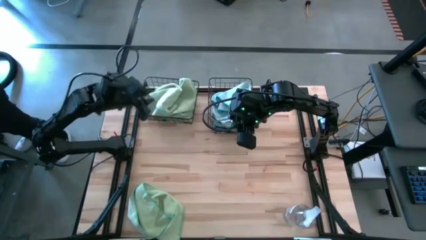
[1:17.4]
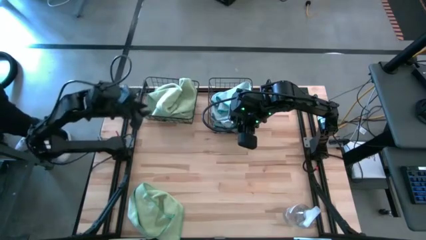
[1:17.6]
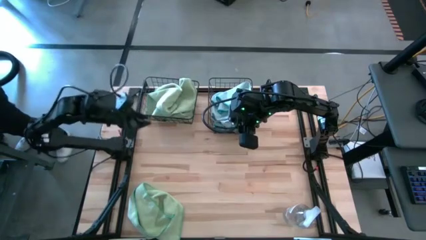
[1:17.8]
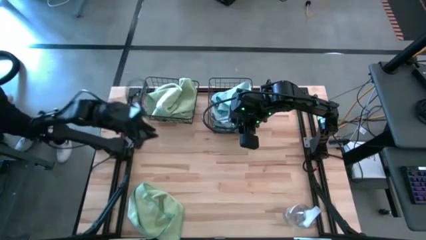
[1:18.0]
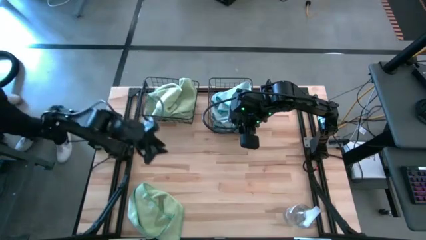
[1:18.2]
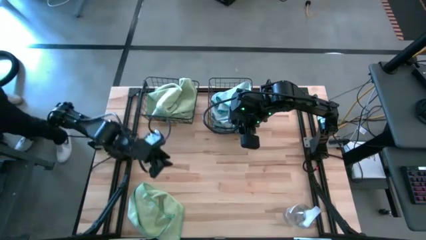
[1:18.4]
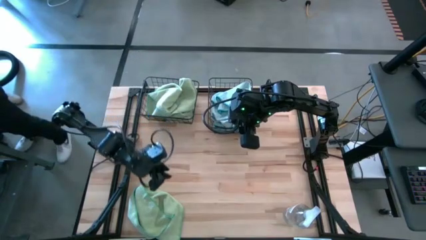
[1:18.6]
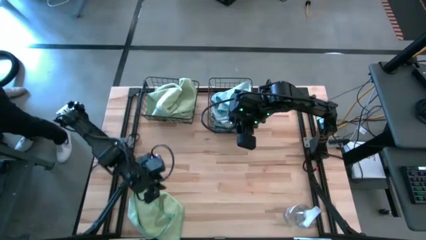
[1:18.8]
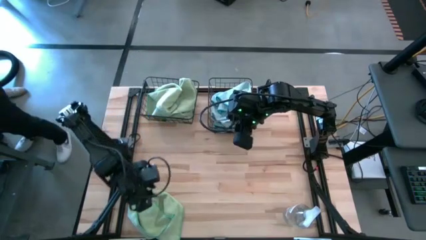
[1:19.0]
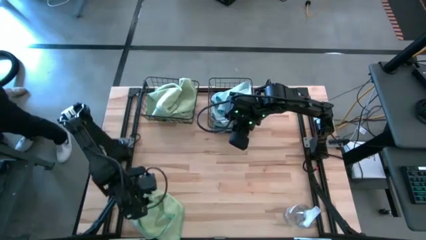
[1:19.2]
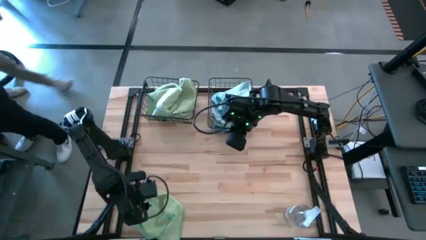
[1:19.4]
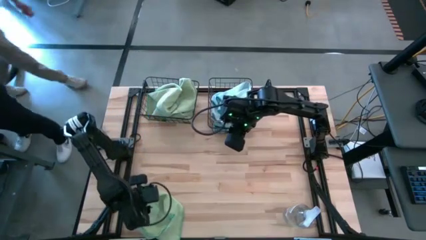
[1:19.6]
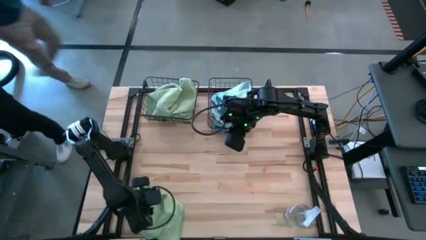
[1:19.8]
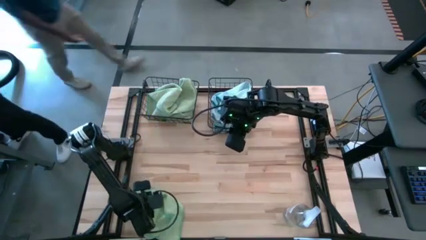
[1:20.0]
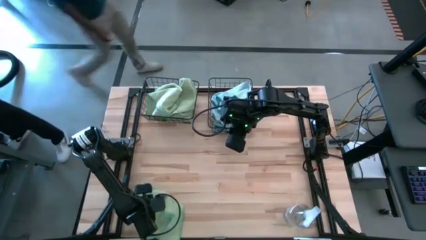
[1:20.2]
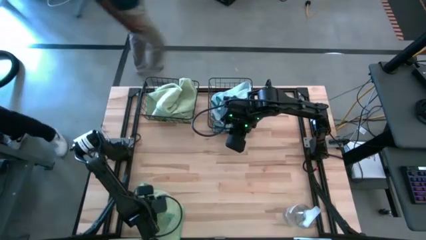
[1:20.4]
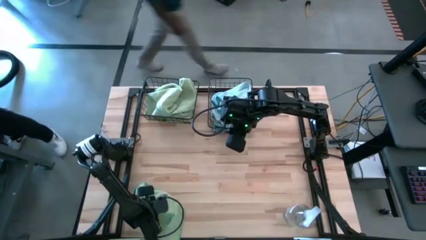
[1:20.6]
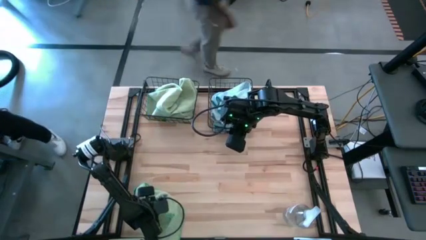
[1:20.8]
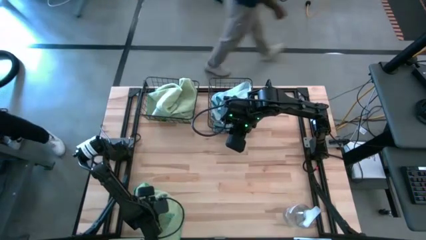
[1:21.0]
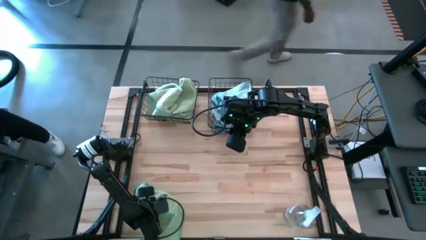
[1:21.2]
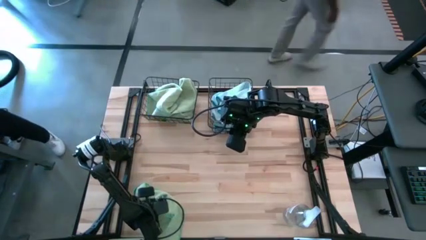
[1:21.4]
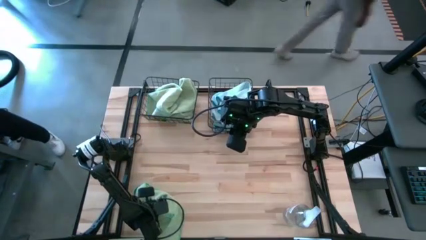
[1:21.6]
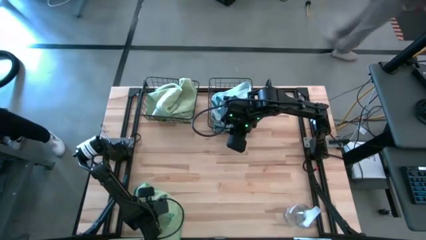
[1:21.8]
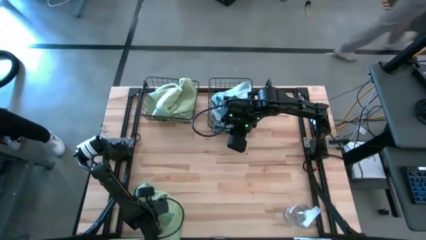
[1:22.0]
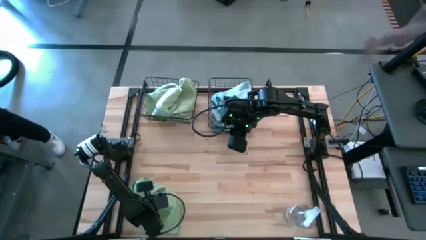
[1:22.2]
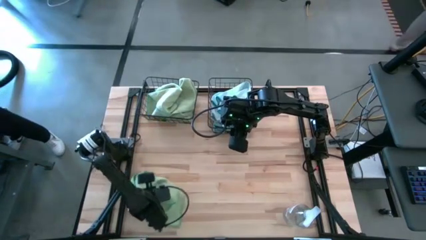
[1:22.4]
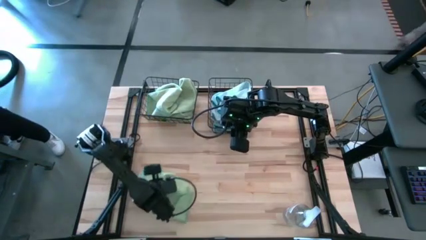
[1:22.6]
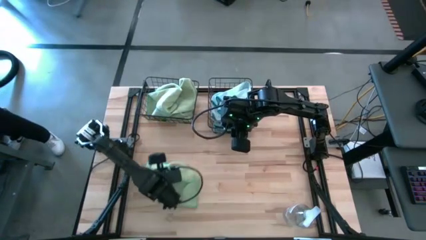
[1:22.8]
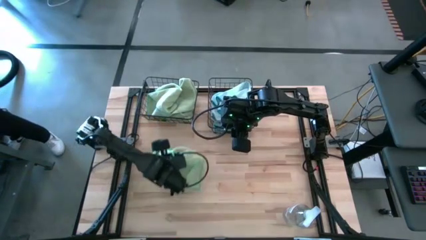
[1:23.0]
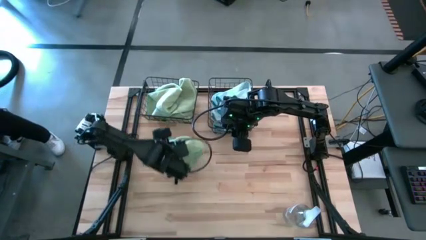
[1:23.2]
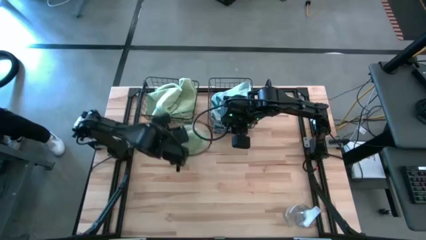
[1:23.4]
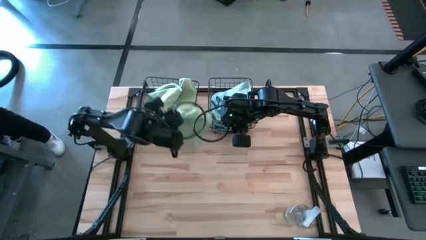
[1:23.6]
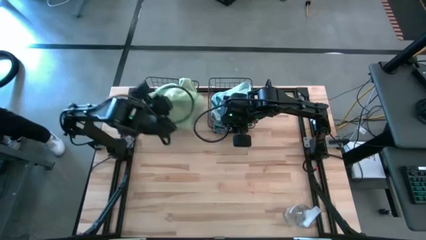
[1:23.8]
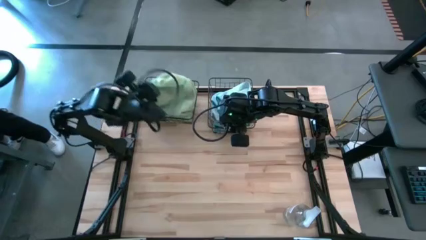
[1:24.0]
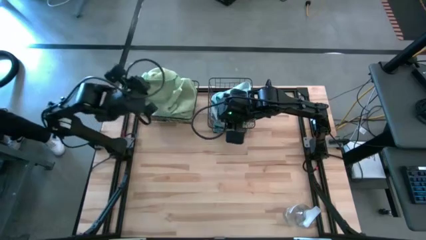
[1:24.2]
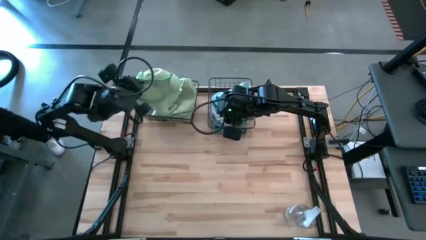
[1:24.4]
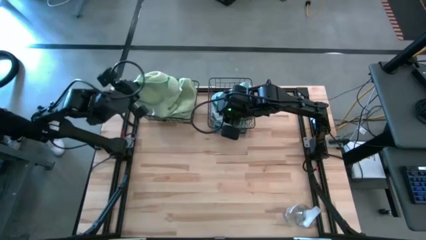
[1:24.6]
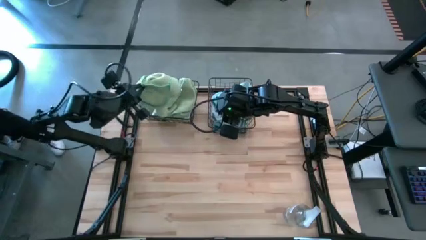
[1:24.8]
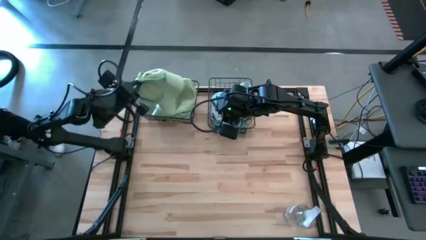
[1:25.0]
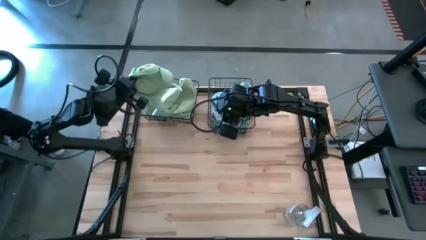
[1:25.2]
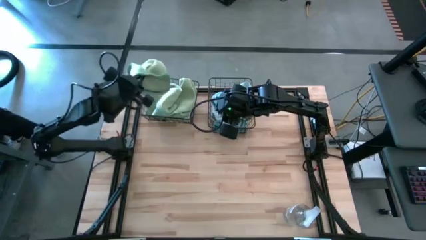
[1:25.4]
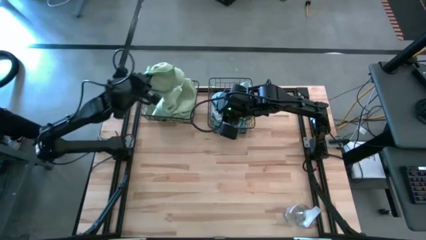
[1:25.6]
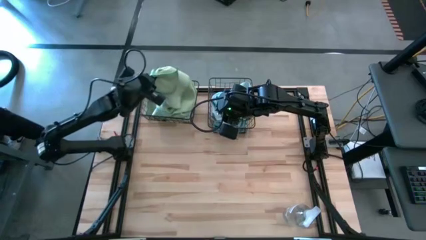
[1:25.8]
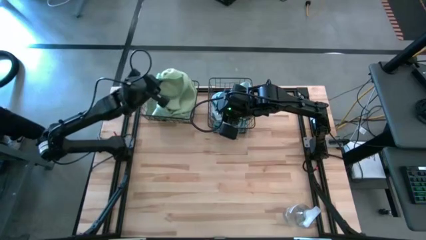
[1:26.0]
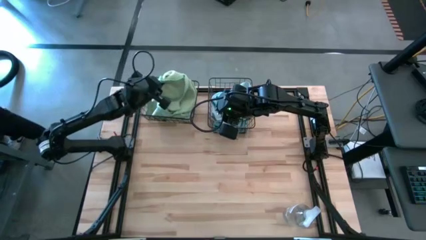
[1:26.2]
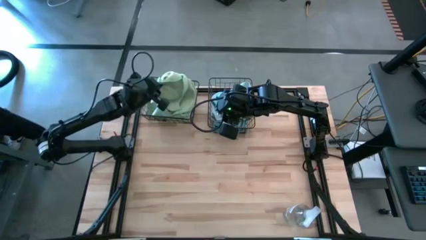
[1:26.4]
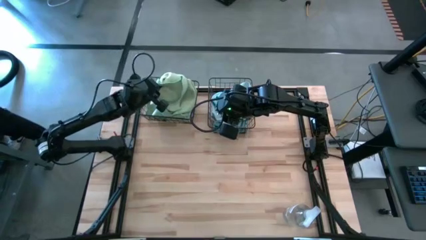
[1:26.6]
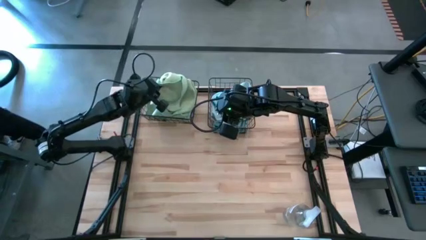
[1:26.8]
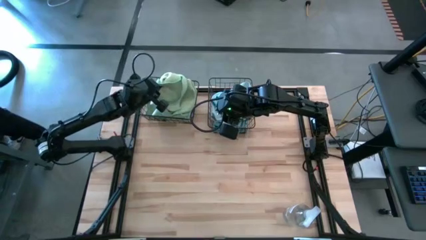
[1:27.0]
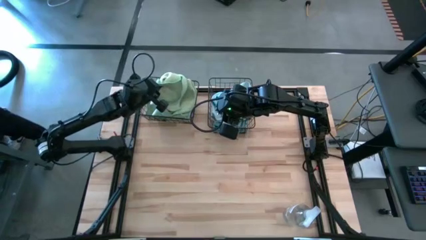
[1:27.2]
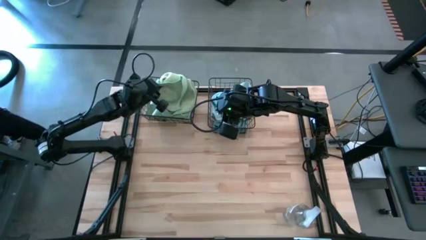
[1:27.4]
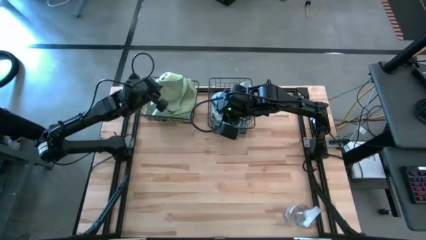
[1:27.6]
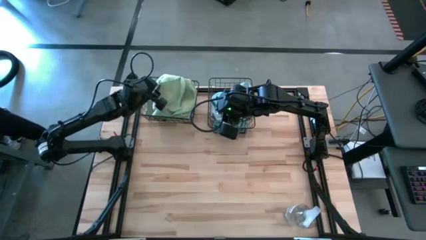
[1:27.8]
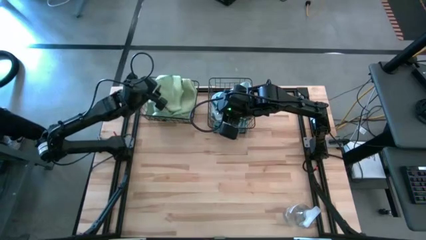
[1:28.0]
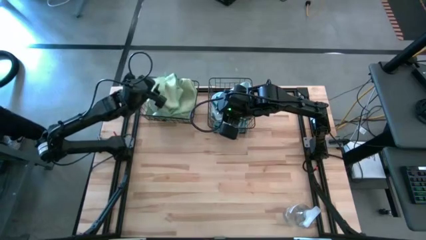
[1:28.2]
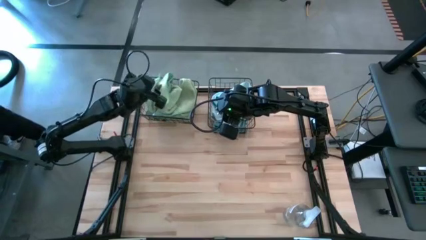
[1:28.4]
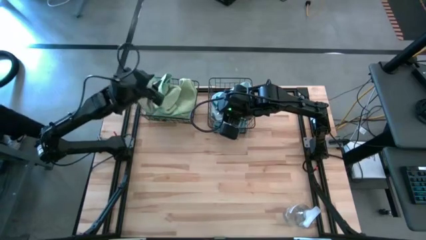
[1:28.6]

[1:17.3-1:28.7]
Task: Sort microfiber towel by color & place in baskets
Put the green towel into the left wire basket

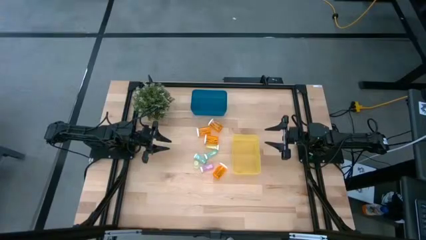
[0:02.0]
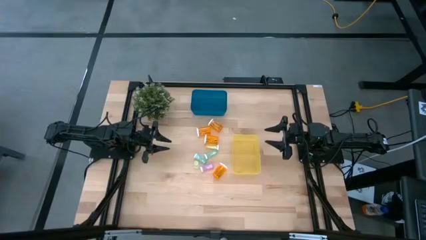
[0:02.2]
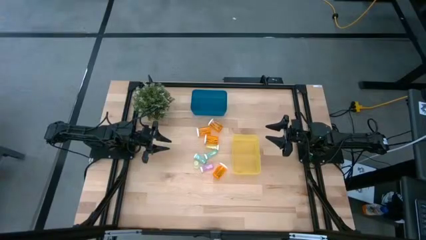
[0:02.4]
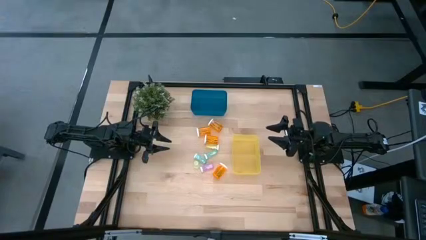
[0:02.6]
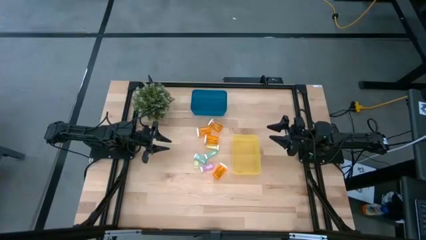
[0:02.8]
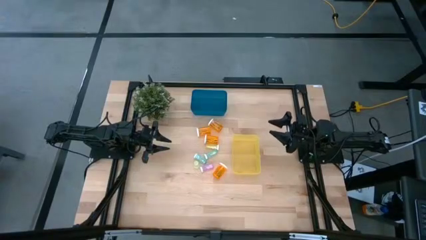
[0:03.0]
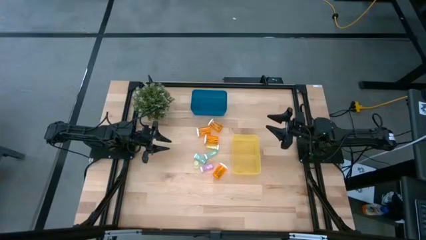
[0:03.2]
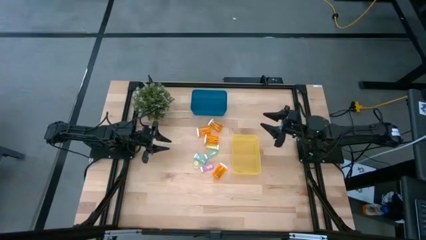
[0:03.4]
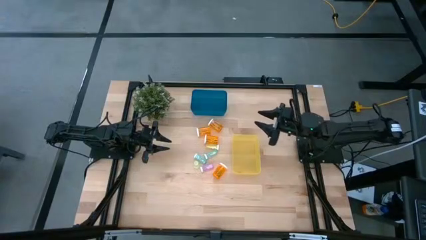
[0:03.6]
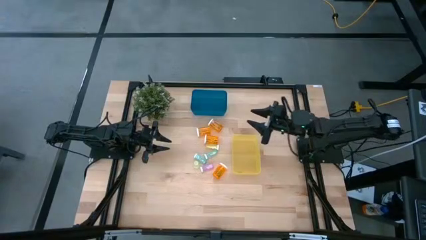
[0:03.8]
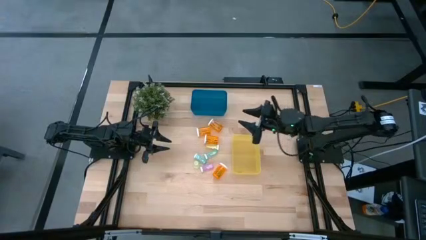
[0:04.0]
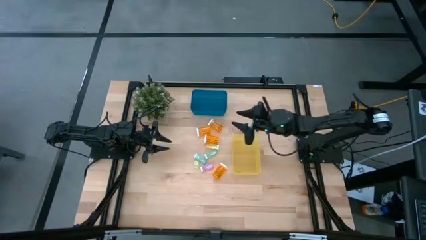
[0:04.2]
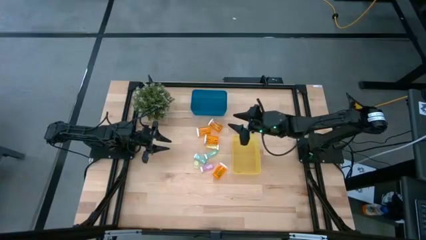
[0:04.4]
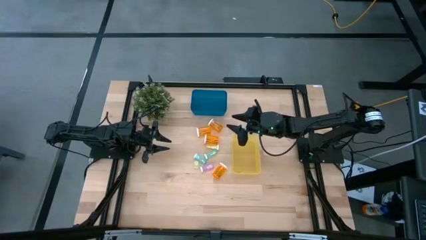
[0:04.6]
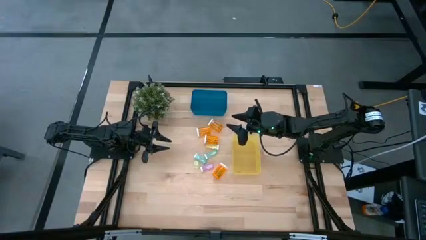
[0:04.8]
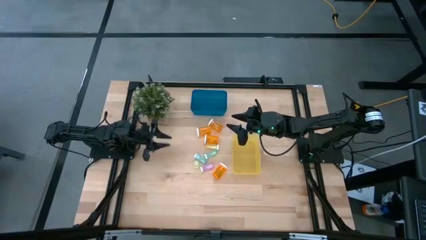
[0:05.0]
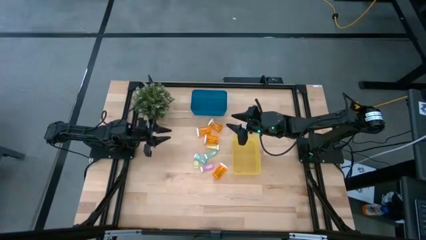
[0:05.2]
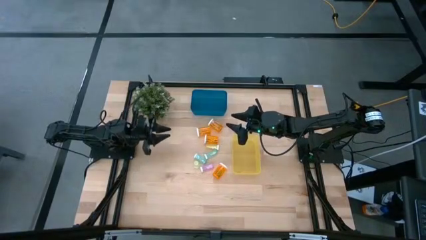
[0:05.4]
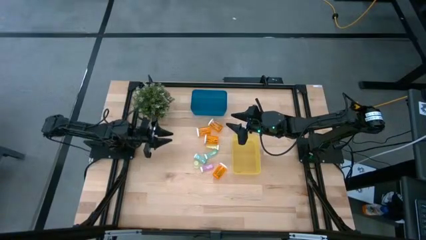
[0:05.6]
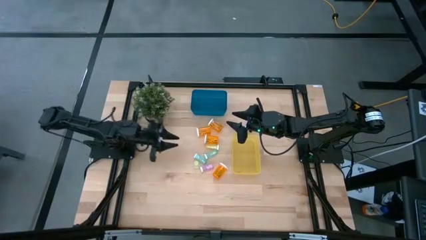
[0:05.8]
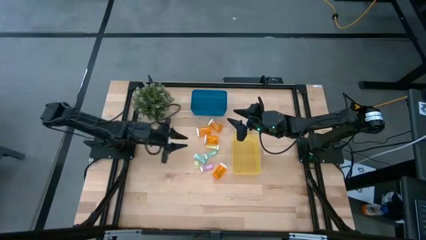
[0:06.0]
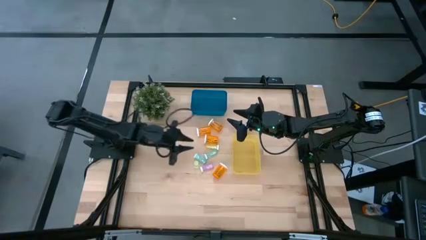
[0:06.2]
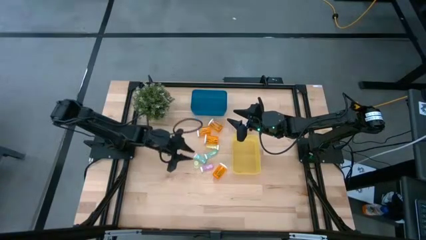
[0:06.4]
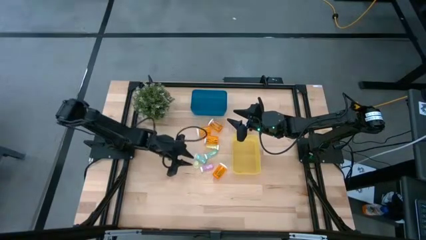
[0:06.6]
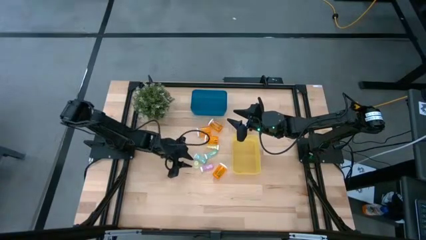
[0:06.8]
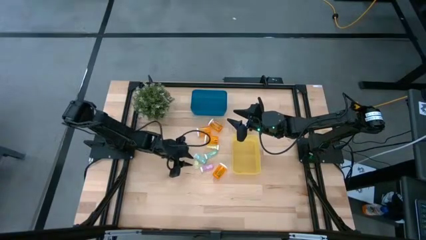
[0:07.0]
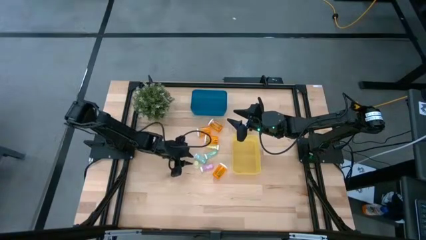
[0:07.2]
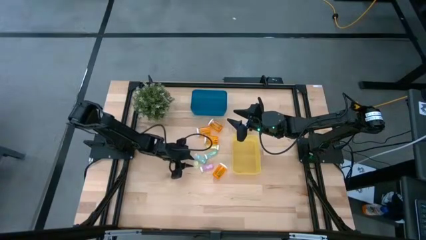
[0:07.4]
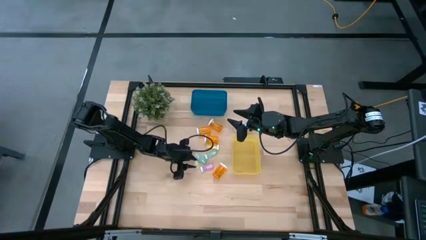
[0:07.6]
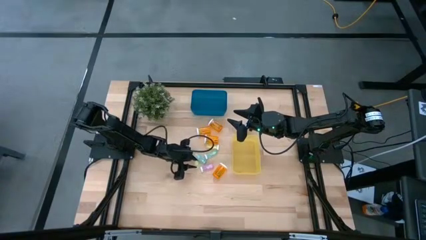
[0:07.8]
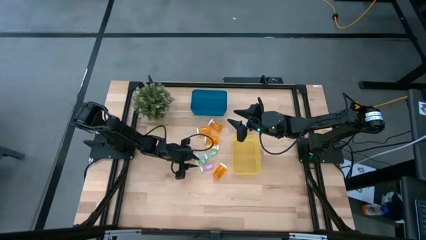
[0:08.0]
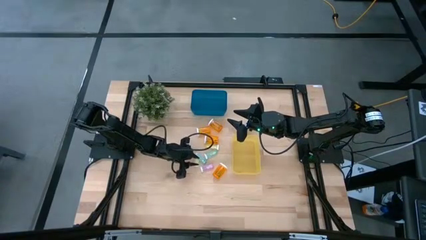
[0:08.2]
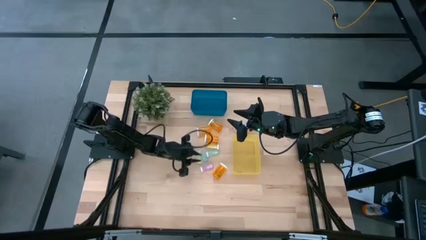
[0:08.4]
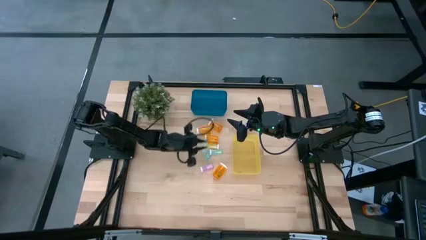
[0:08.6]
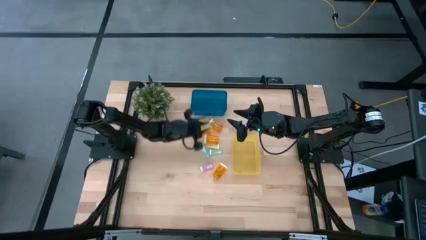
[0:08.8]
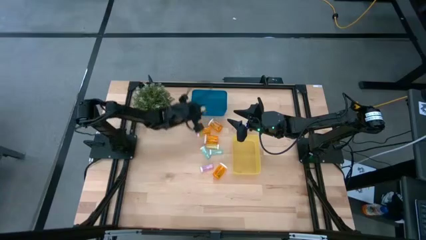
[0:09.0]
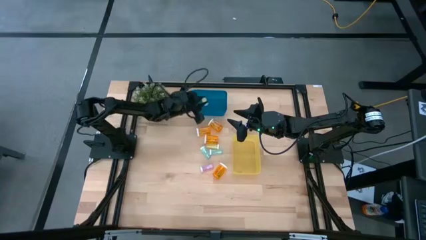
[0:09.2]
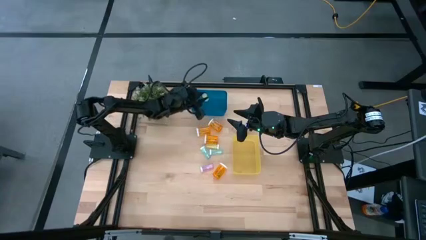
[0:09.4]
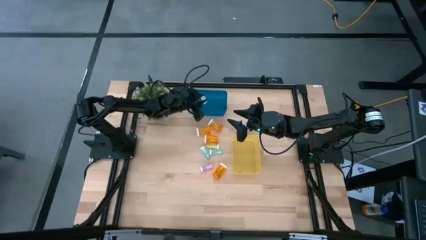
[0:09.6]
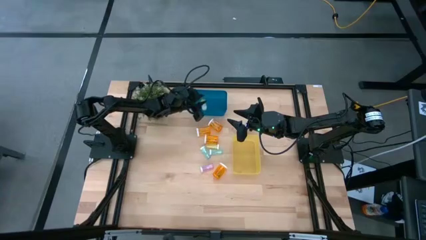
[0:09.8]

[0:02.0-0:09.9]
Task: Pick and place medicine bottles into bin by pill shape (circle, oval)
Put the bottom small yellow pill bottle into the blue bin
